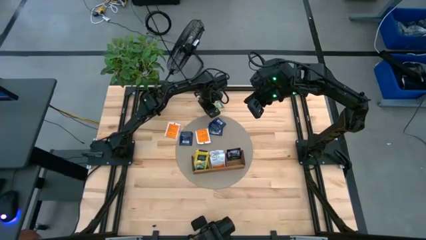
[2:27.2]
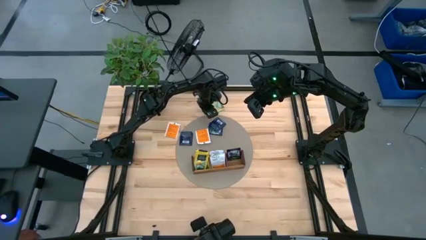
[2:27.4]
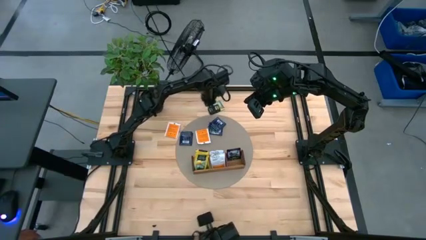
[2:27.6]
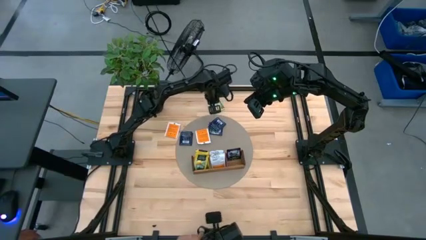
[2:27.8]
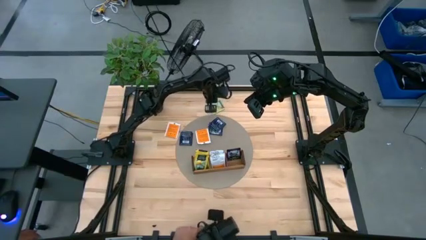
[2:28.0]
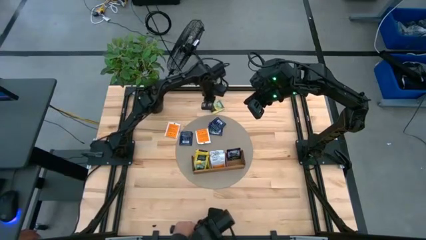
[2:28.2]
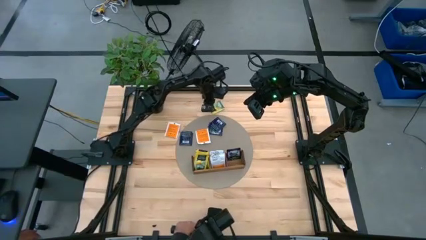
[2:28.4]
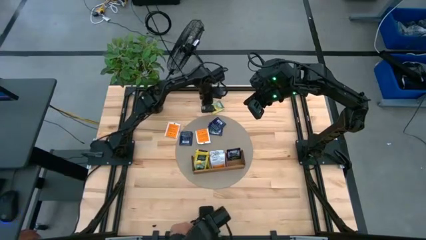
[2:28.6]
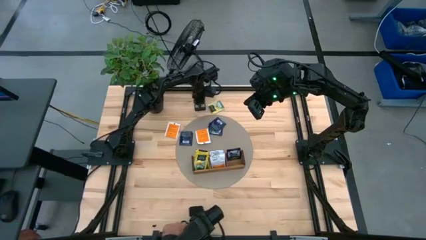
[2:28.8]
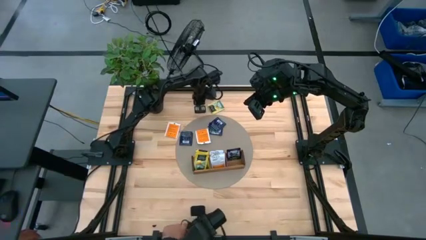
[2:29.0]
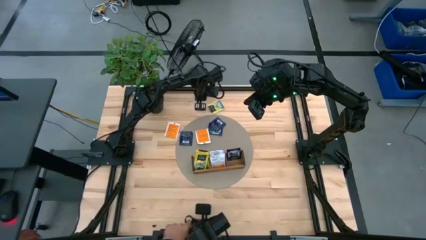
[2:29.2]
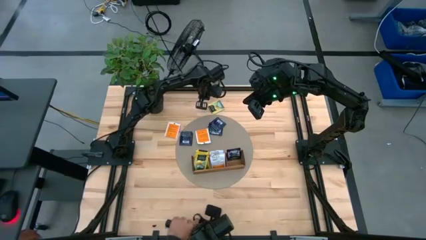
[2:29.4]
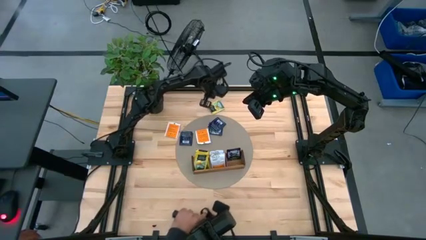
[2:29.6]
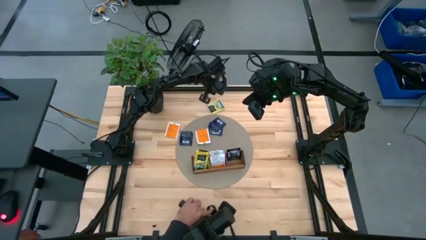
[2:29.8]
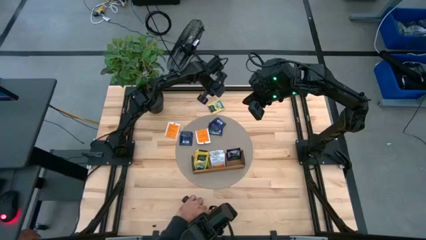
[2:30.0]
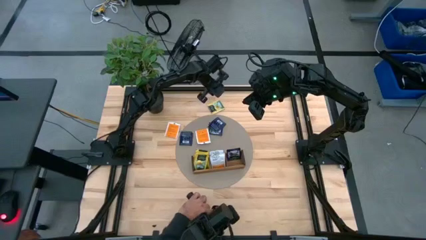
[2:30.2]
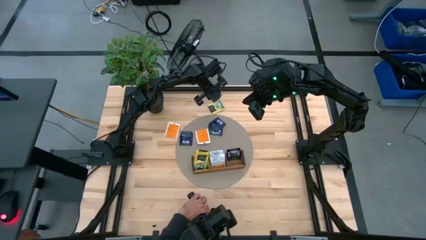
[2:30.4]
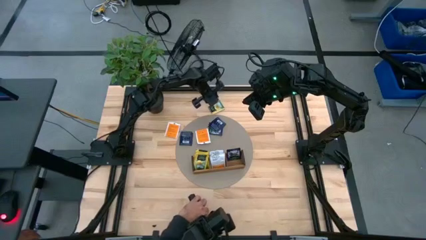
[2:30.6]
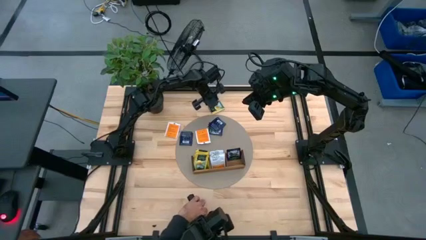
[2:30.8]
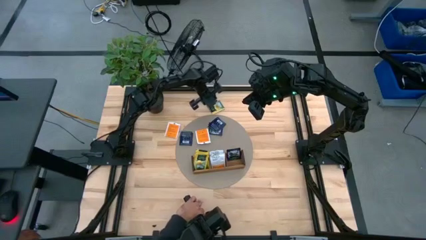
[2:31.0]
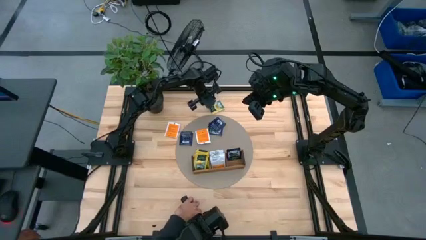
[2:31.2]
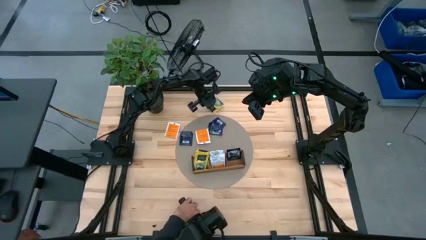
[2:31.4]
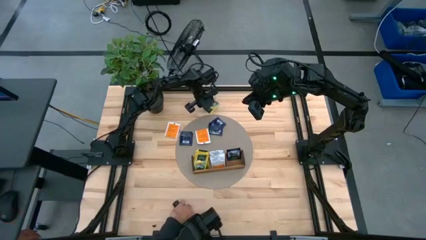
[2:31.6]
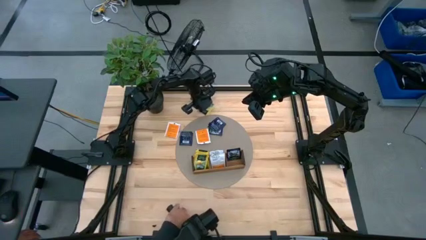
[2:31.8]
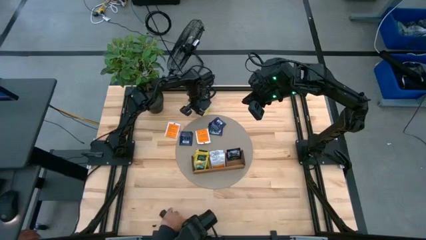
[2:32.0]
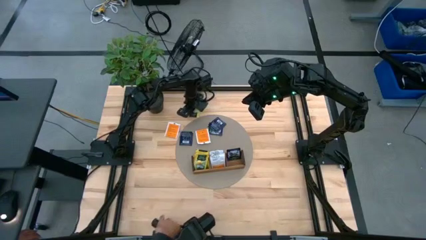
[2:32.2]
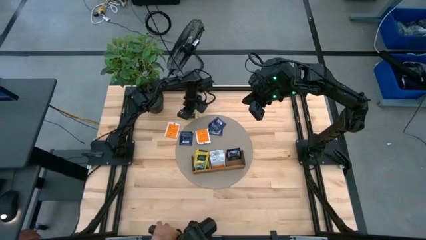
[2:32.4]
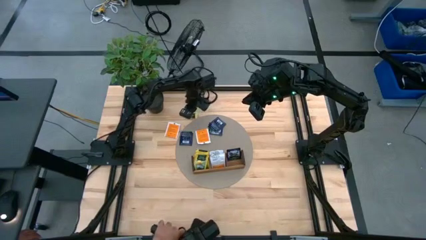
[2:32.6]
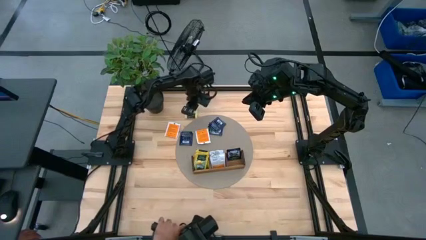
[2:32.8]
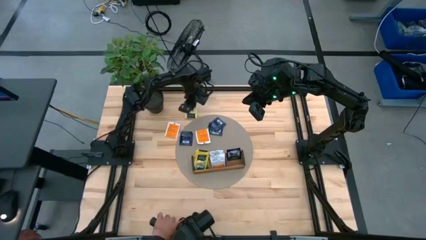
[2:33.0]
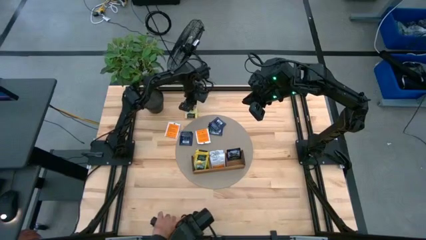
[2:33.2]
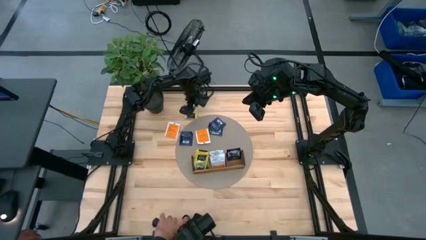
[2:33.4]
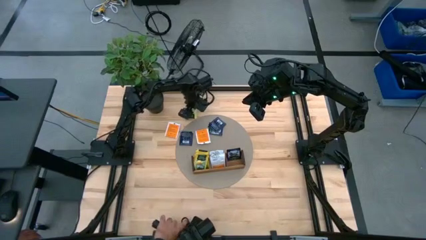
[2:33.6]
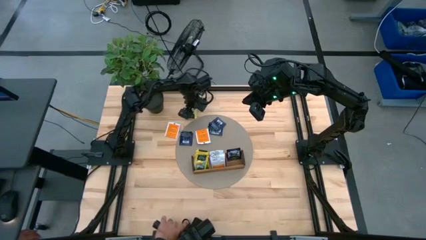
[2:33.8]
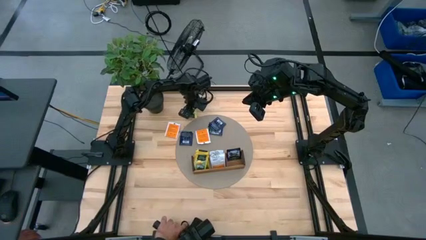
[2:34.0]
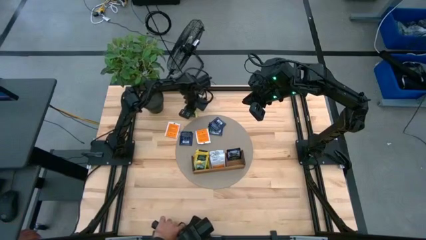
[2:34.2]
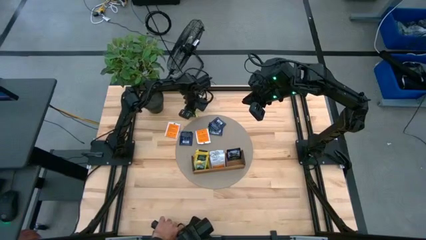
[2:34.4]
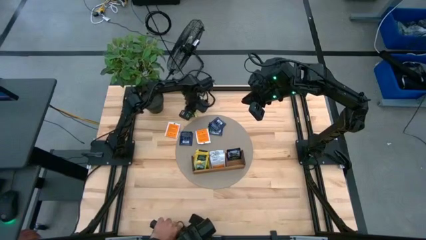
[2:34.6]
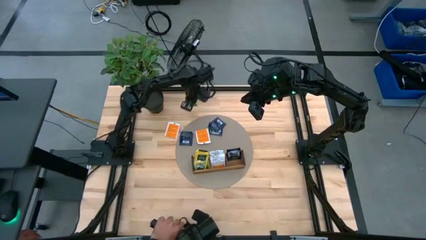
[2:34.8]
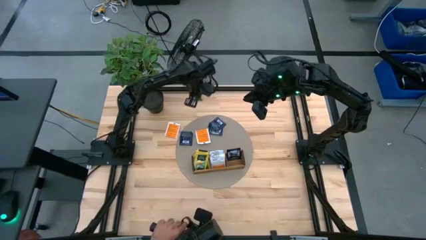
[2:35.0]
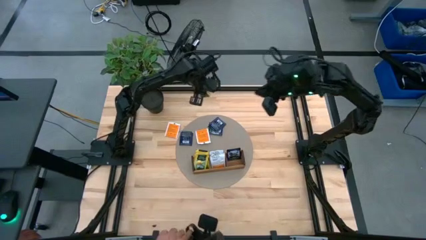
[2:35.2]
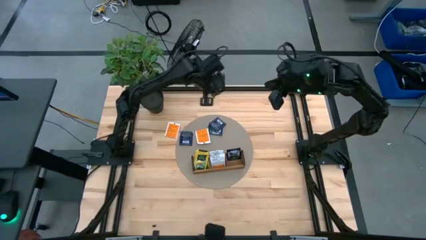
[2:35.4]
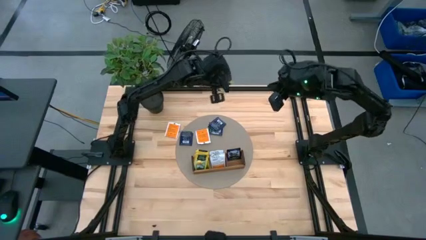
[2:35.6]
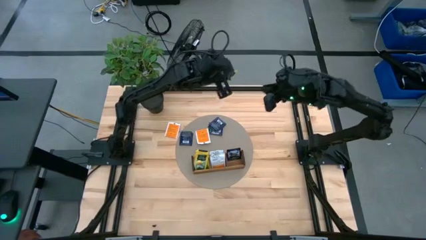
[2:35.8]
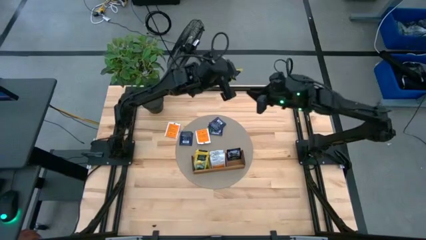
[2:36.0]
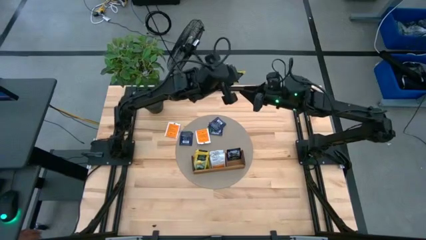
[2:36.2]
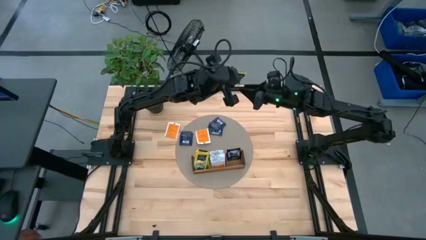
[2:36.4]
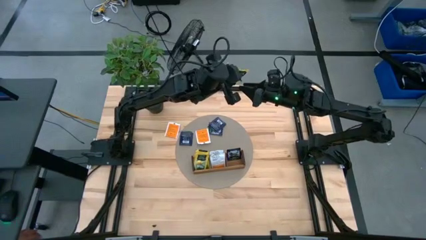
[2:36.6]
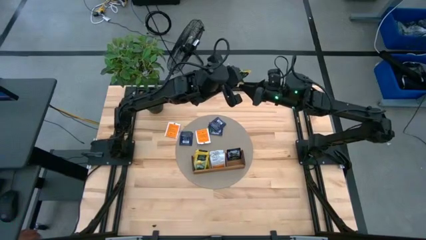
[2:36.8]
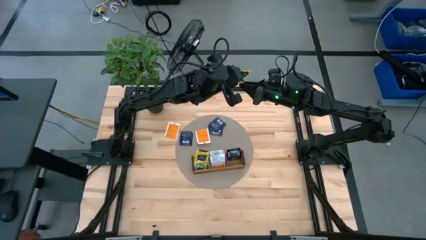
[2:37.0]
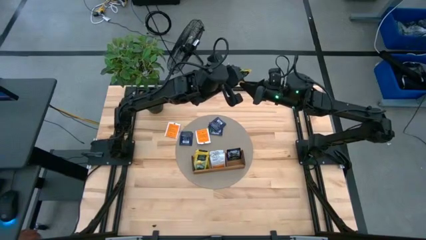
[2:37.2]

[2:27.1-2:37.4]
Task: Pick & Place Tea
Put the yellow tea bag into the left section of the wooden organizer

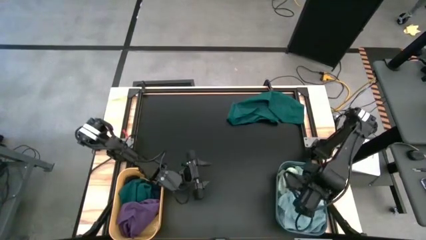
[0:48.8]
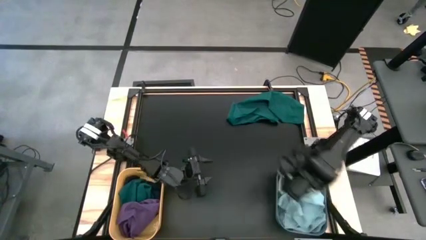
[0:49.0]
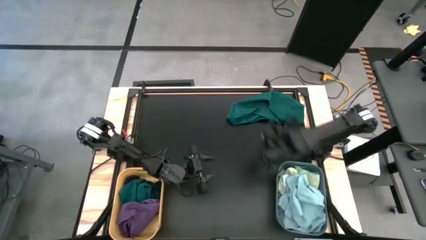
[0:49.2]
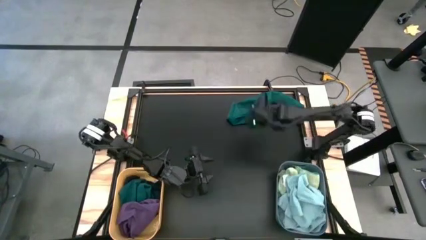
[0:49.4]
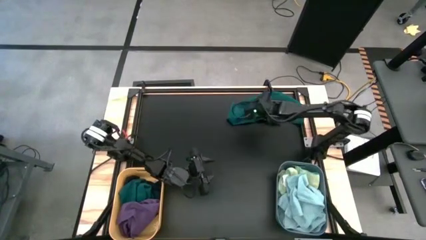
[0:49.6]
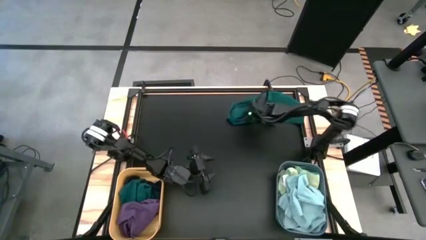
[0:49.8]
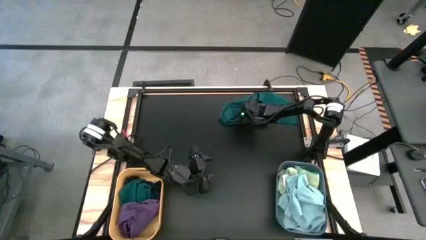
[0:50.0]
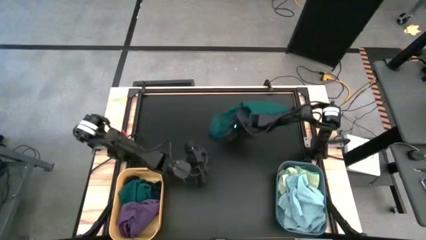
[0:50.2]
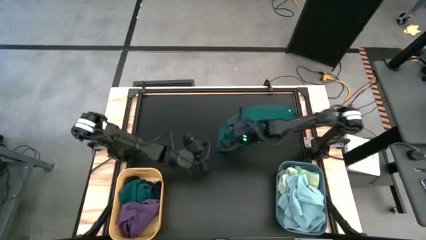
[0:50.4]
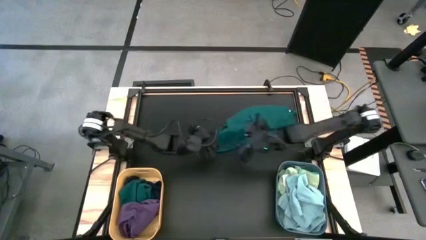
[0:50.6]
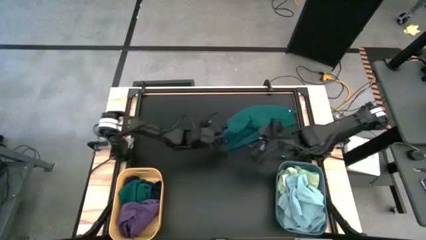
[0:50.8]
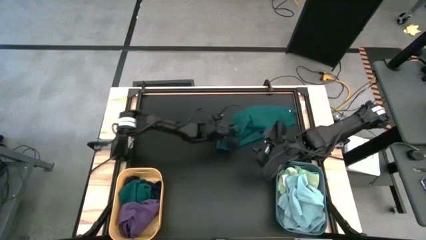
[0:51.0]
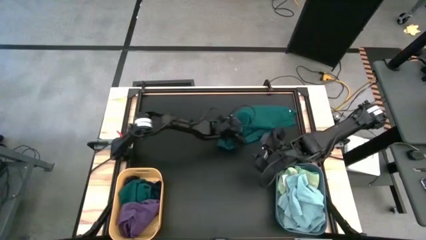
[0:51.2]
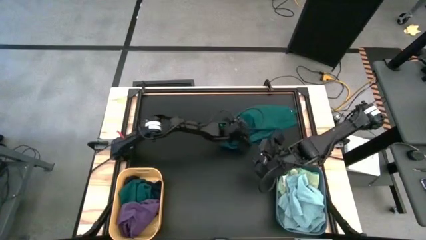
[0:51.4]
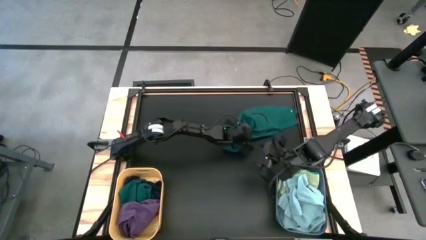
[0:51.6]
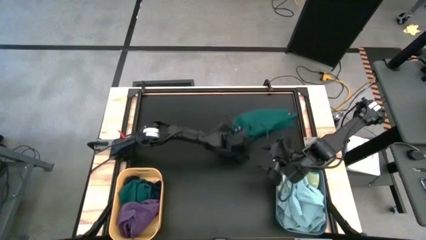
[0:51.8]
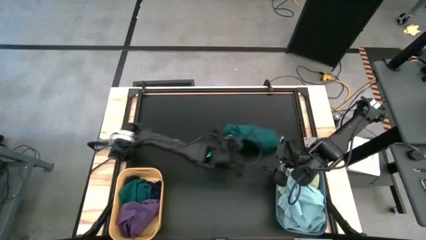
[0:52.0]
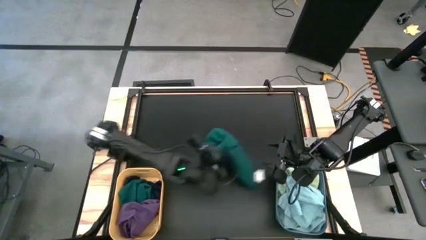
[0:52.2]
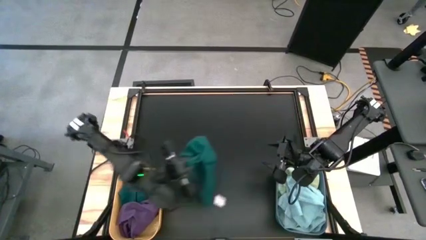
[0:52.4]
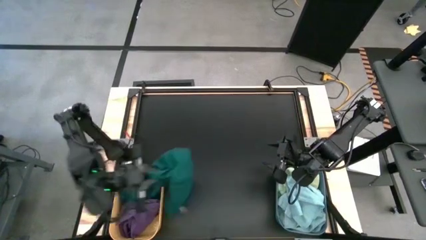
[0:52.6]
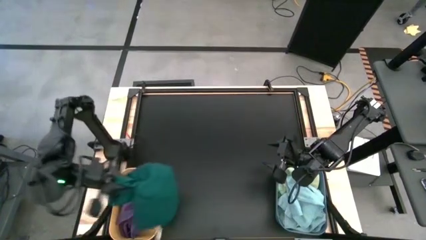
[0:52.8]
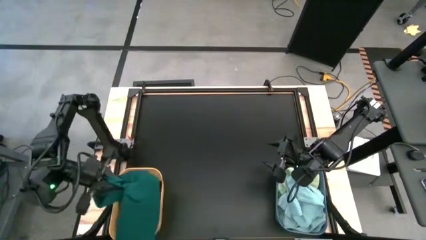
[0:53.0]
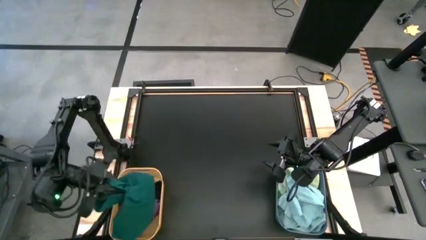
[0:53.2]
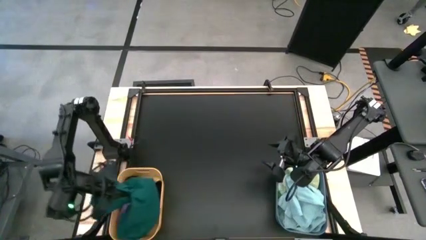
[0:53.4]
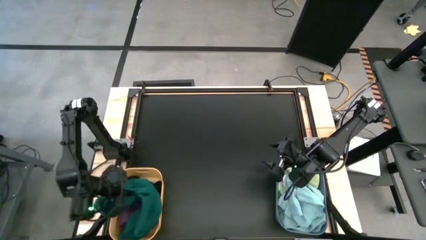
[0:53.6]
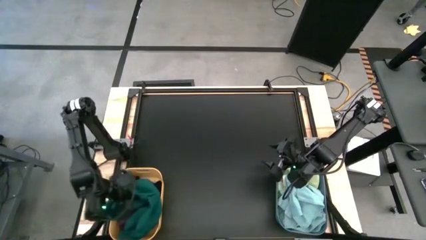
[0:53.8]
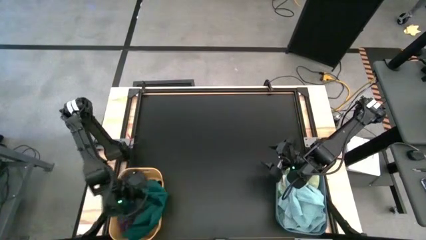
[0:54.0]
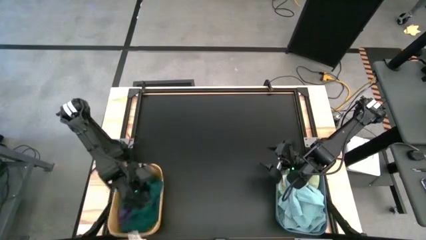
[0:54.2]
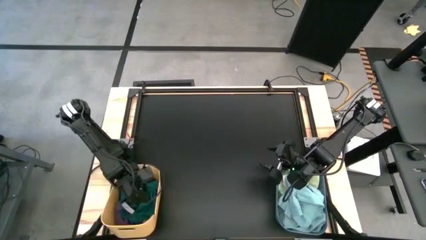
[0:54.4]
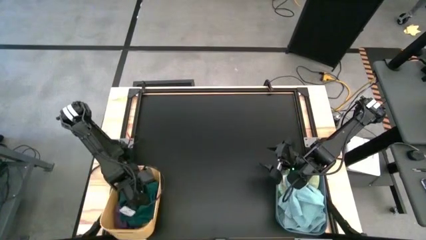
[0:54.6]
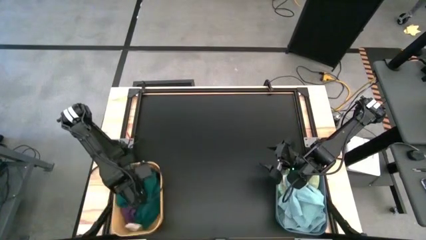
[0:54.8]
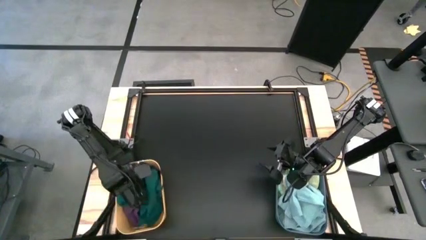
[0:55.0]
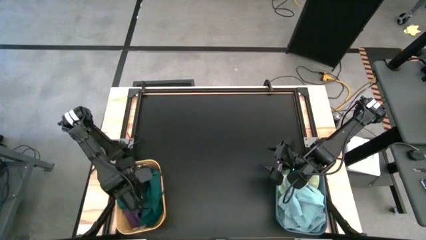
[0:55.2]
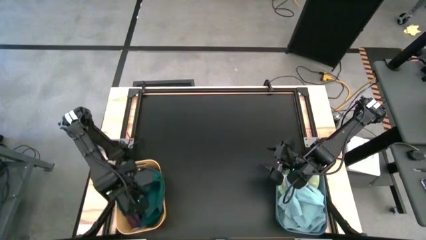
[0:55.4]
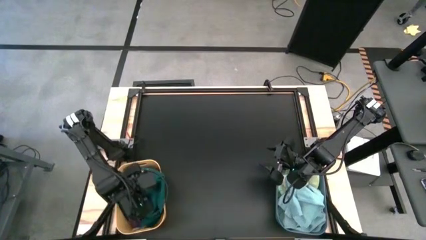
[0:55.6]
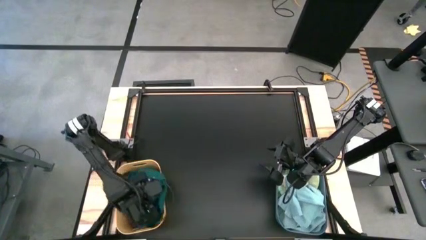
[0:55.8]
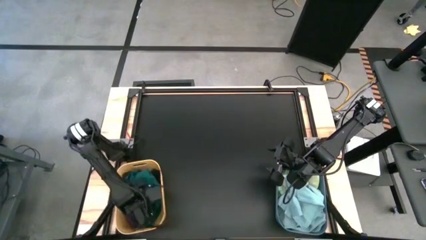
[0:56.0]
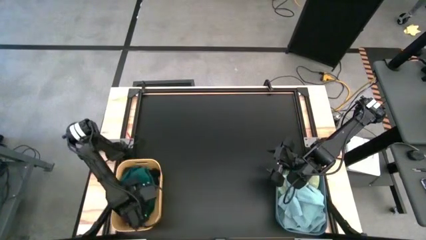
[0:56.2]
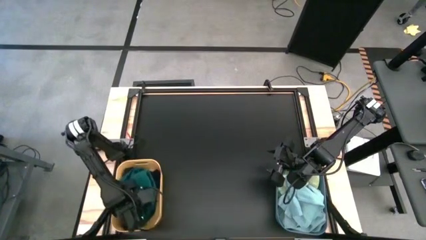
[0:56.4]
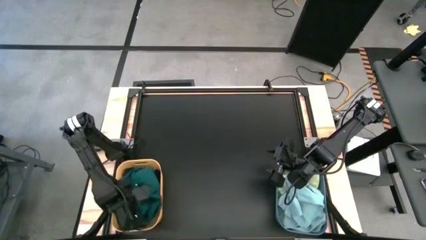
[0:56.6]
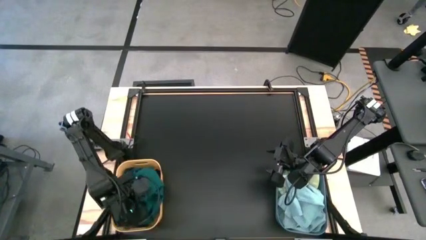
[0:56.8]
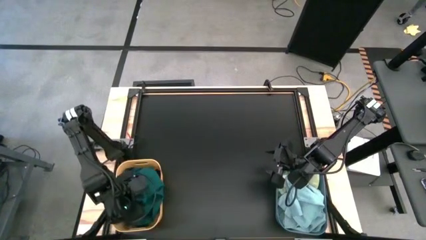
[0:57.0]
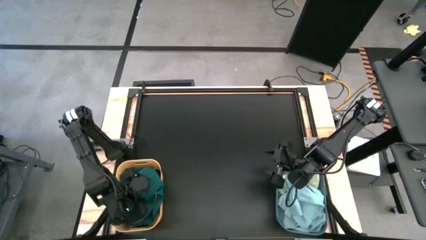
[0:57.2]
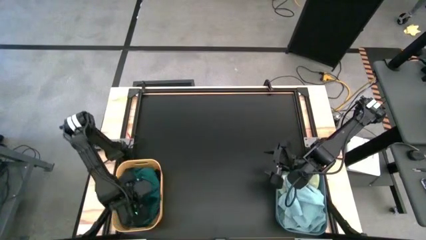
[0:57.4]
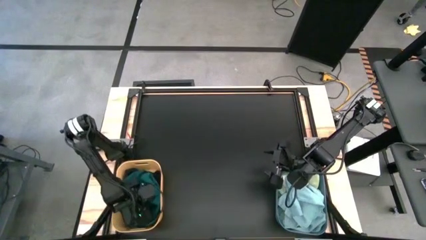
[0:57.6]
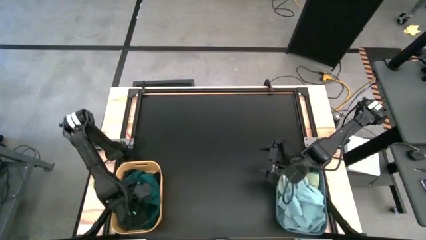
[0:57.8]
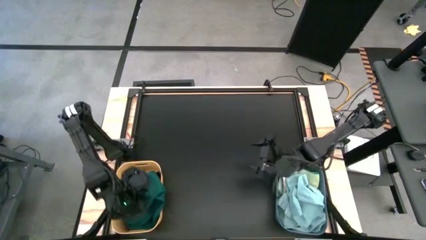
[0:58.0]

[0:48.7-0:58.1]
Task: Sort microfiber towel by color & place in baskets
Put the dark green microfiber towel into the yellow bin
